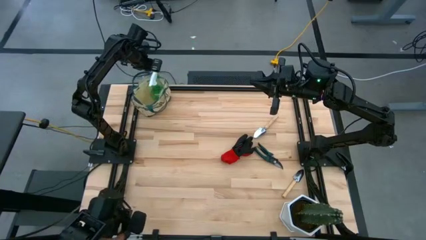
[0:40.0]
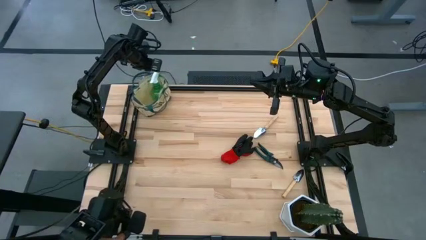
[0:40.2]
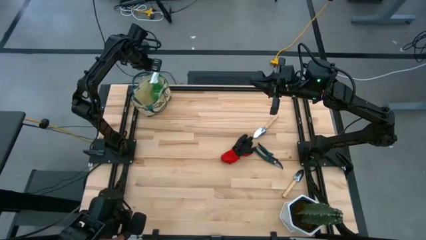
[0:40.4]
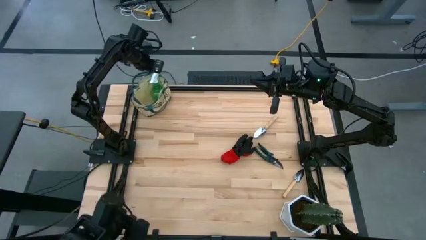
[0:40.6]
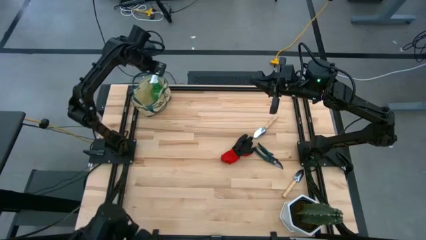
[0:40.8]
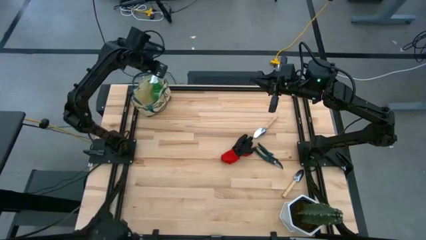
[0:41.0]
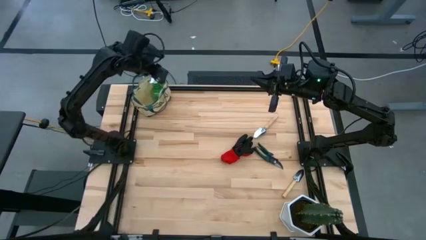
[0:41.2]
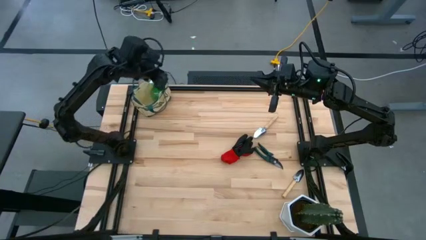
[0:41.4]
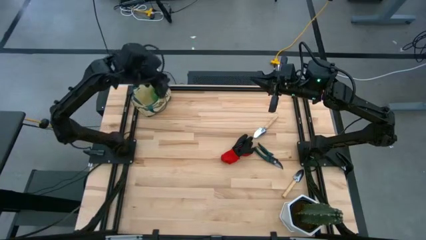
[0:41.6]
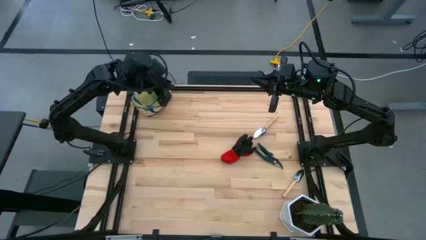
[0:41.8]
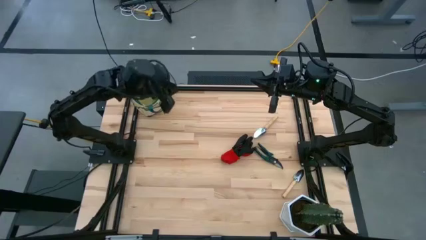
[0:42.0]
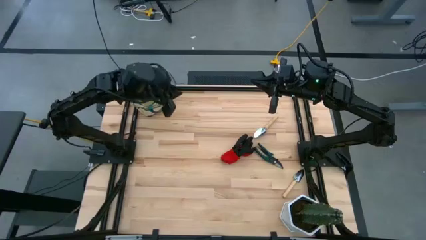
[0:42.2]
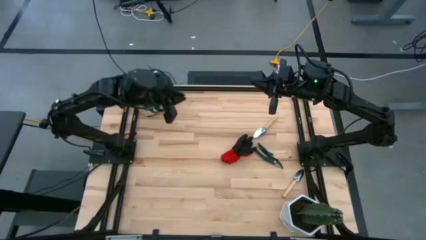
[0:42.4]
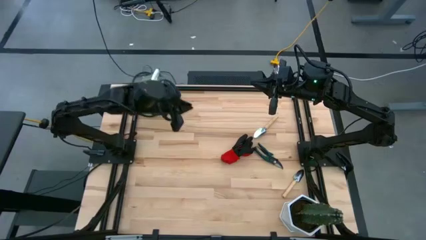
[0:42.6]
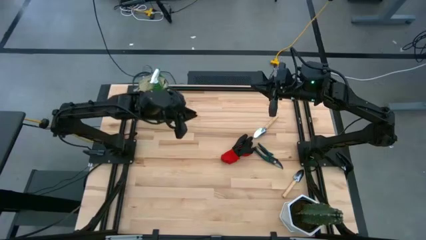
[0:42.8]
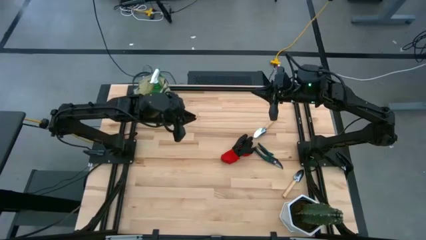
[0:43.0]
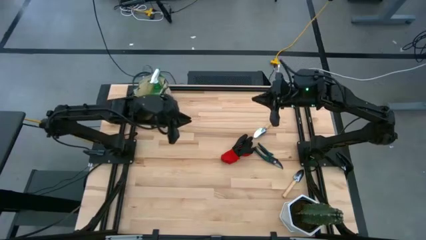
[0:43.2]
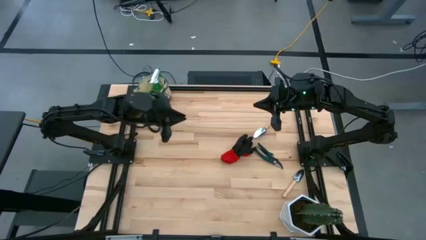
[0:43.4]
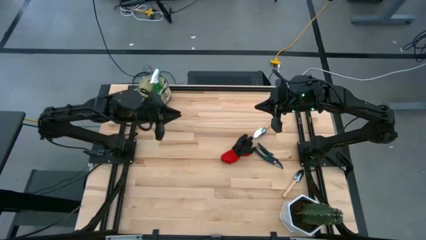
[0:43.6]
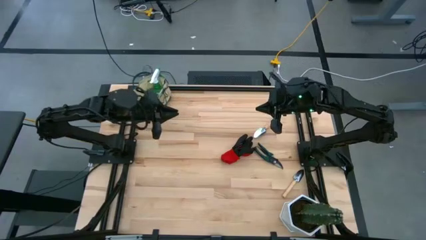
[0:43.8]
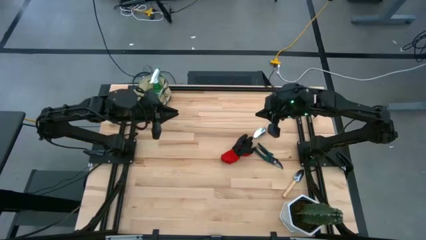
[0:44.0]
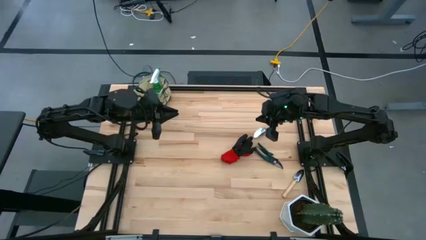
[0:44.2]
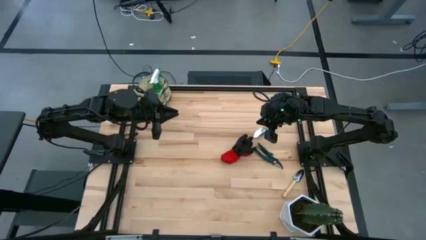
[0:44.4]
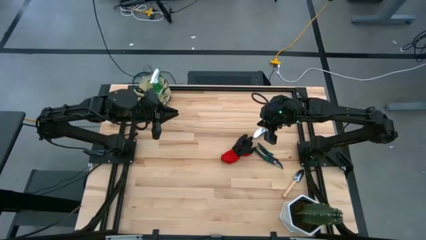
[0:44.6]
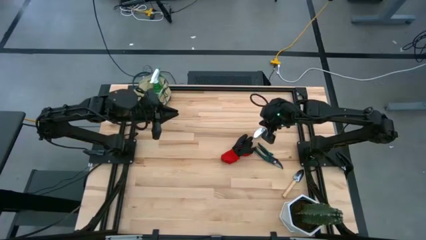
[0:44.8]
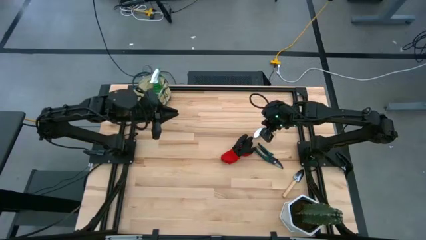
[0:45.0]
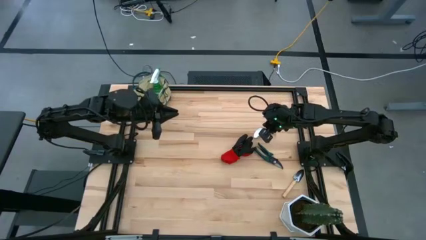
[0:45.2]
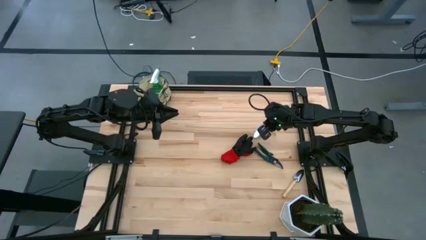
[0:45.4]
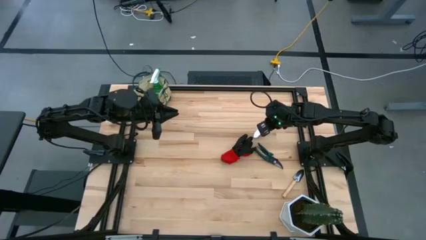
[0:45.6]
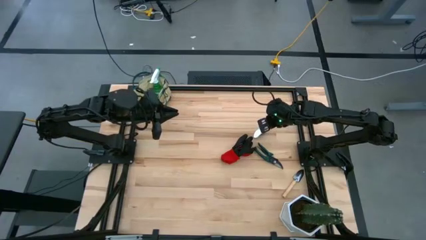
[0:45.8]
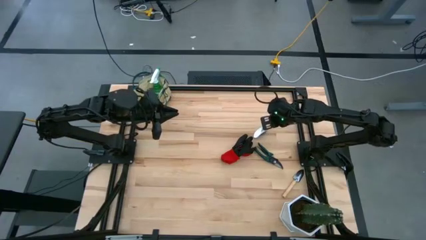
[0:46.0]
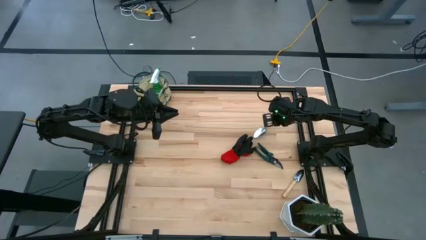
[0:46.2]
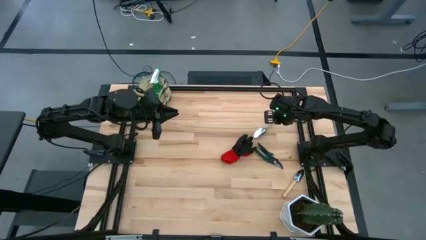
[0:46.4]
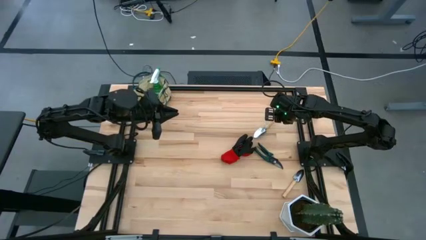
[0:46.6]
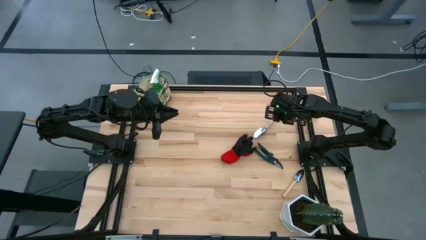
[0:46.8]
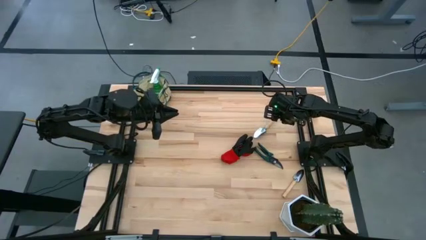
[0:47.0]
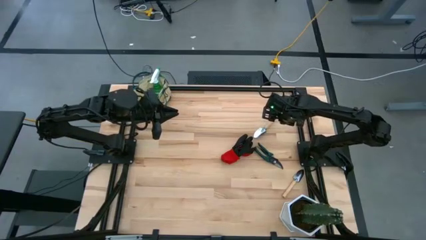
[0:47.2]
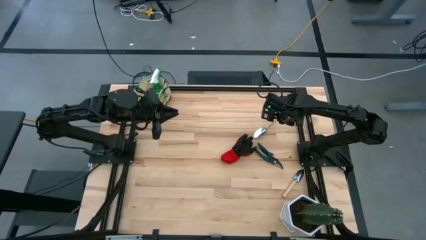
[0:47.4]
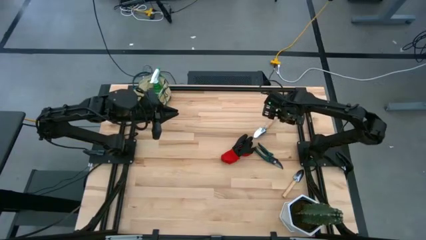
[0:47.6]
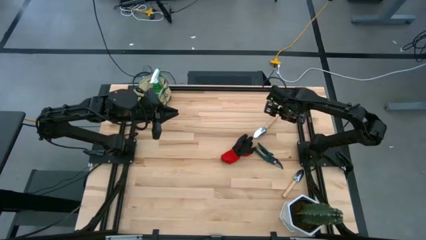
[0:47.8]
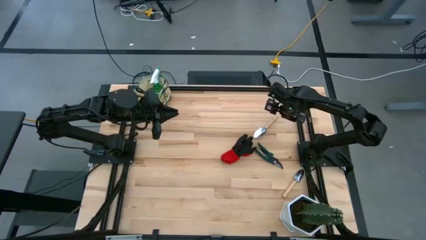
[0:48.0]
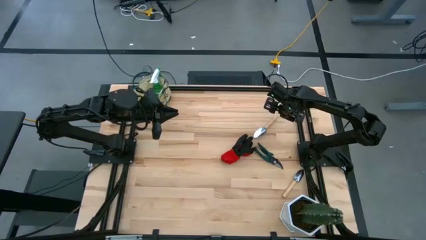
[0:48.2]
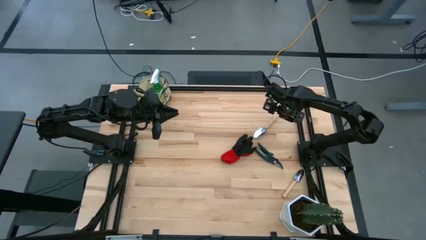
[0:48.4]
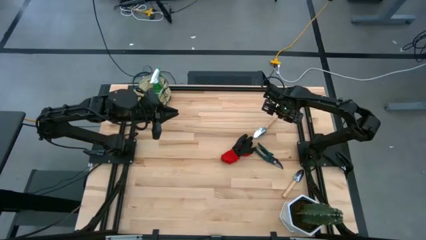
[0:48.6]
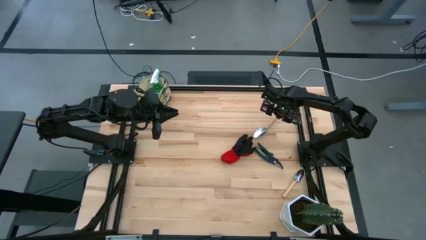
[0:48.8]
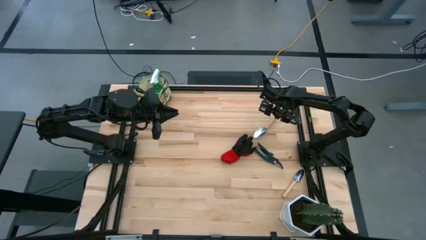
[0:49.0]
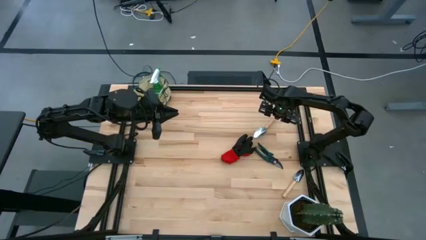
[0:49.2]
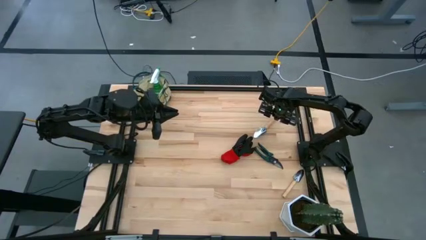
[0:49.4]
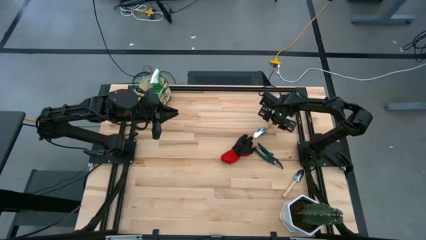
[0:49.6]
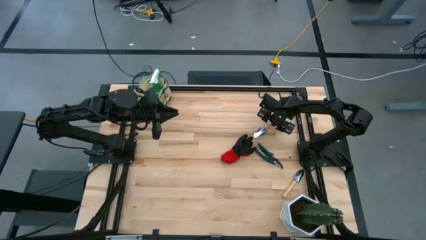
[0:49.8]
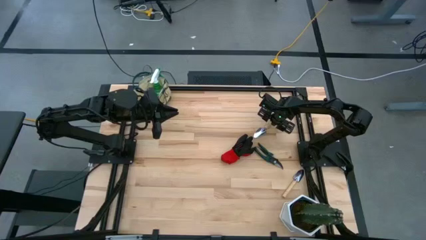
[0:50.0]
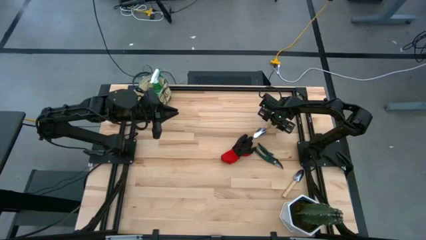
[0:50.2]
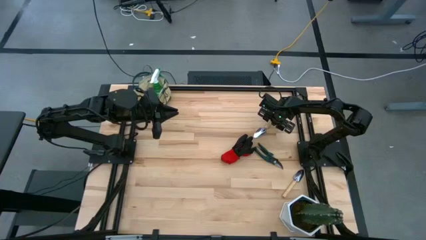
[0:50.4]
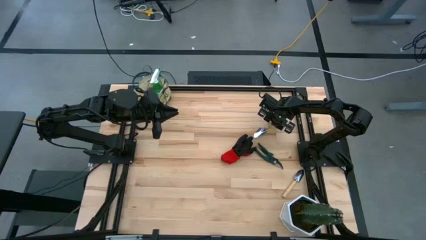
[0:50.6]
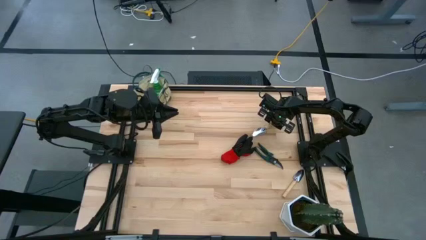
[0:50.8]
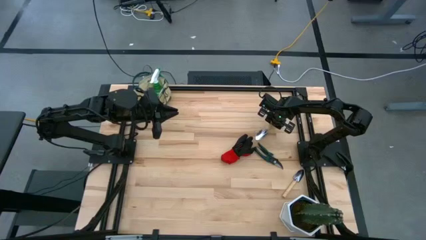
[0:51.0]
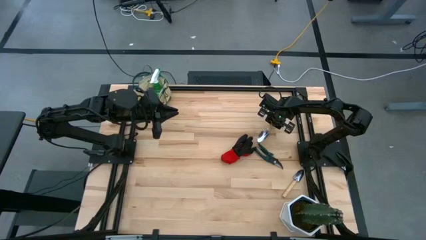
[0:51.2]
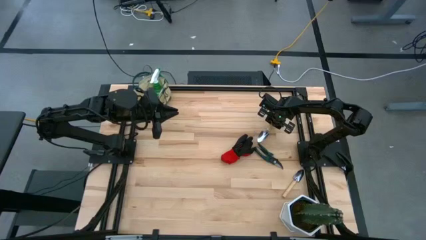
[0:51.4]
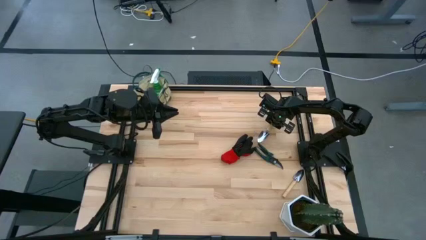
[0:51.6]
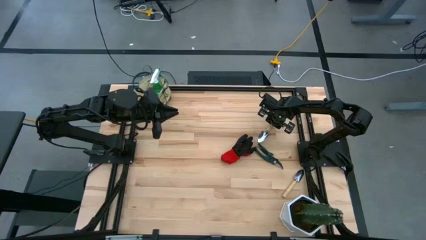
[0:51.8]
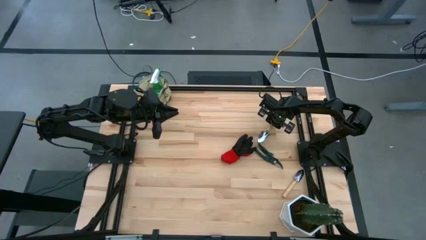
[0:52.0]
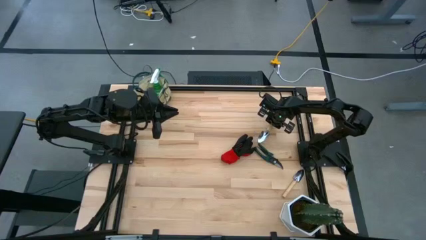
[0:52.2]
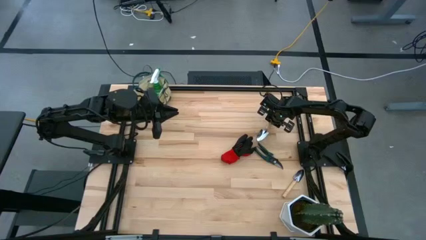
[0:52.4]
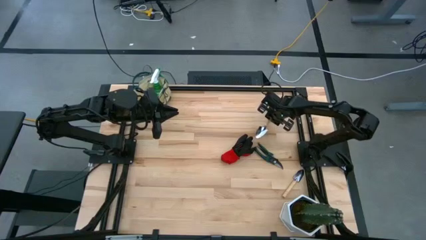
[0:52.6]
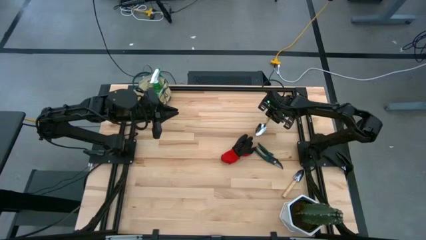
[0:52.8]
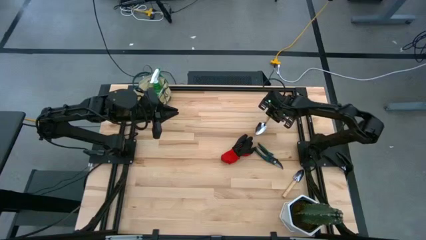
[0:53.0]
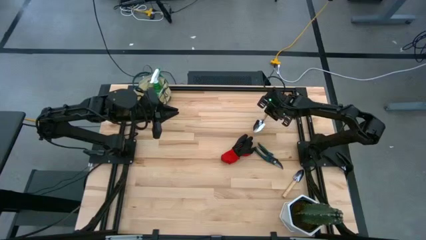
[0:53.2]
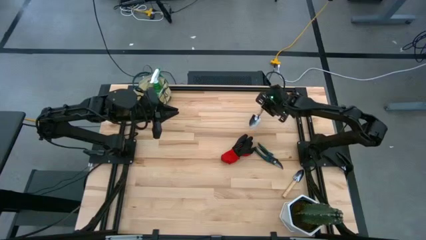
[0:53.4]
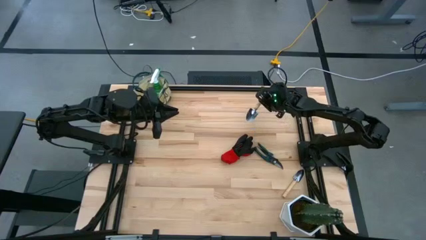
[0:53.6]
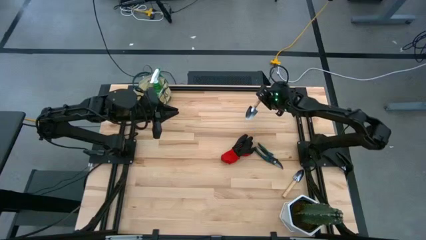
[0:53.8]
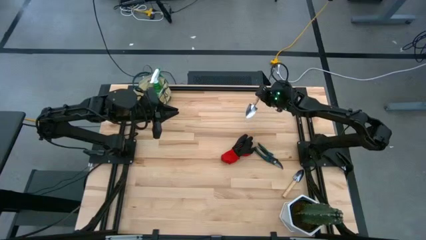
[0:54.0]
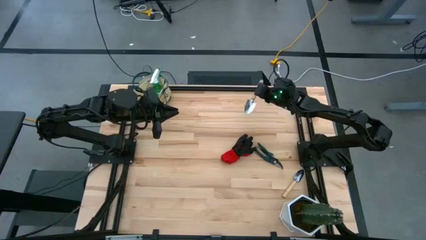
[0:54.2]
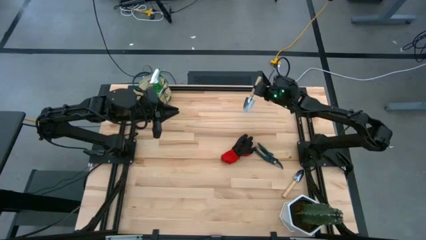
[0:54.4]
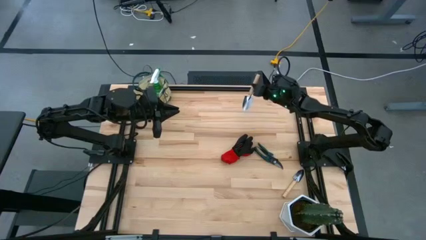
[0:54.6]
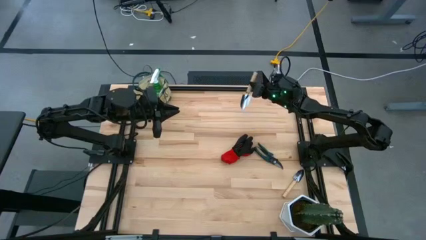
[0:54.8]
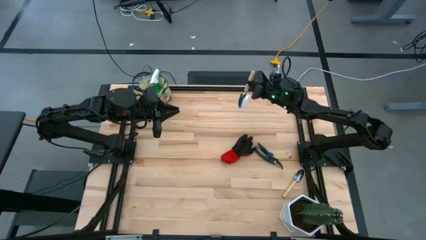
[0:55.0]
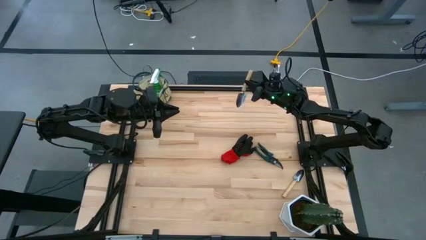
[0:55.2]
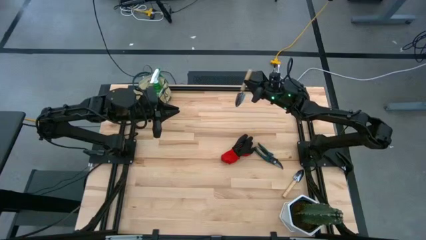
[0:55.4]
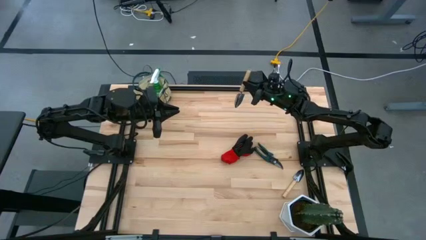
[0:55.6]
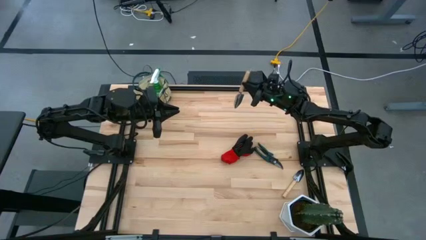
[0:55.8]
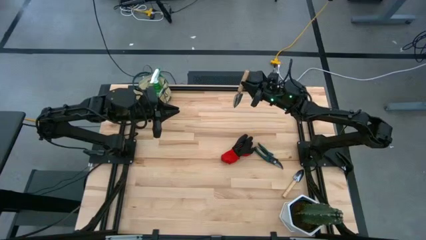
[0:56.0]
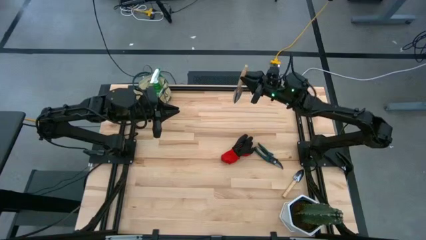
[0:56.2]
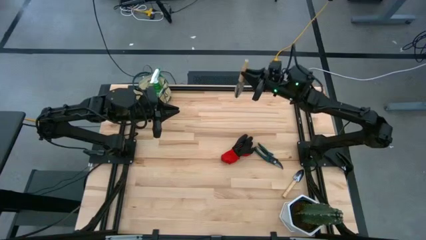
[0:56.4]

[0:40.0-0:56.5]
Task: Pick & Place Garden tools in Gardening bag
Put the top trowel into the gardening bag
